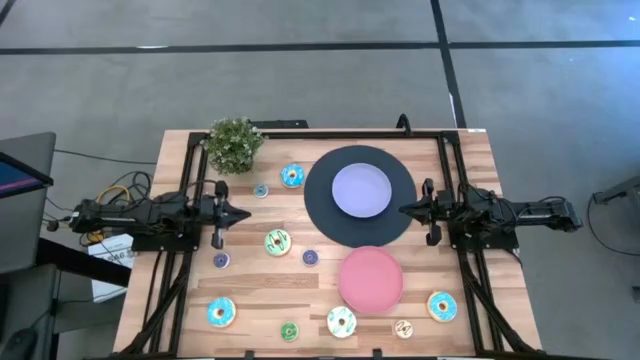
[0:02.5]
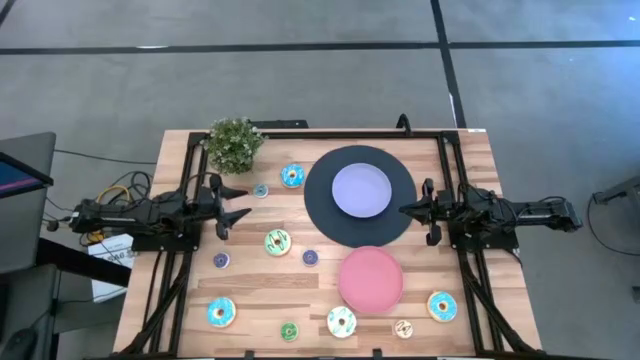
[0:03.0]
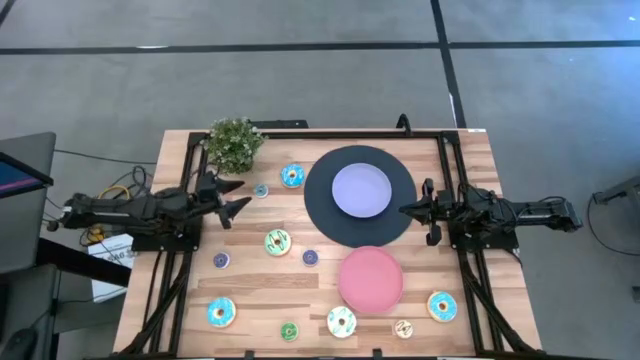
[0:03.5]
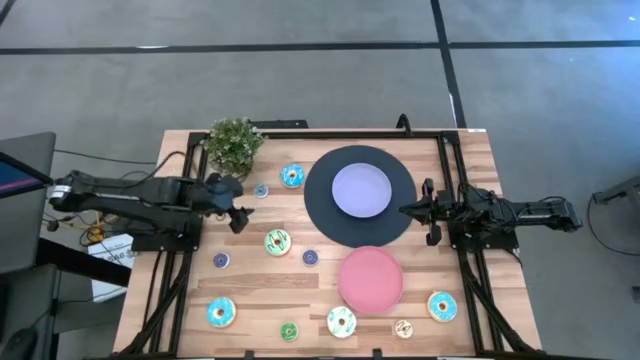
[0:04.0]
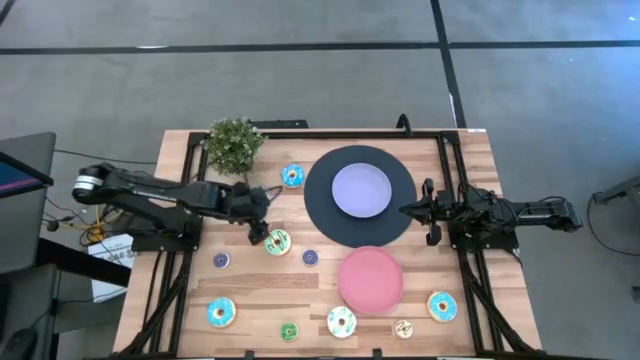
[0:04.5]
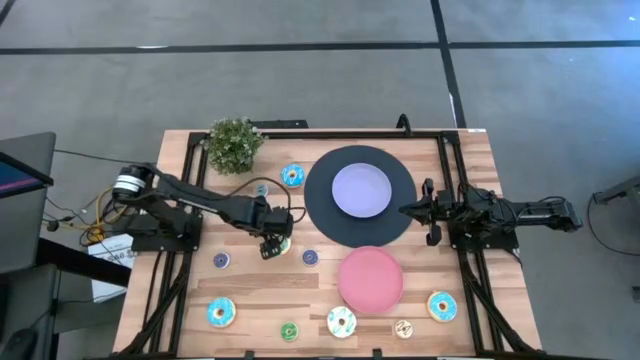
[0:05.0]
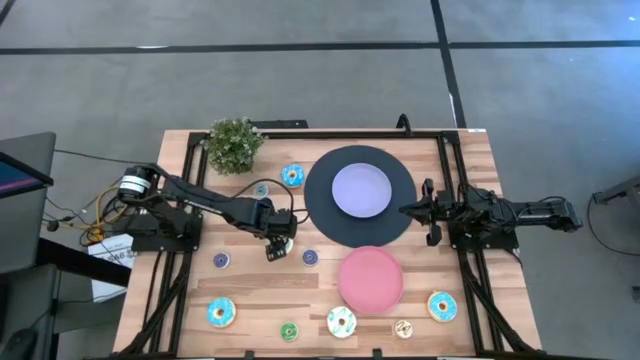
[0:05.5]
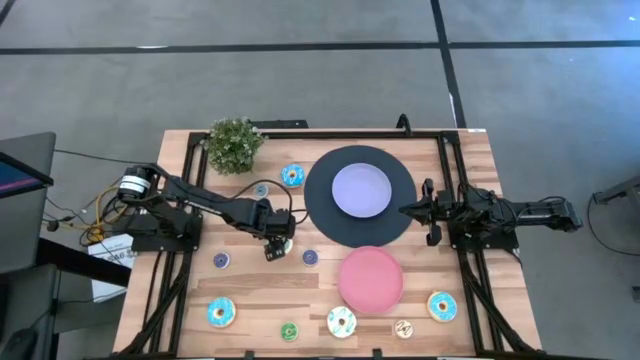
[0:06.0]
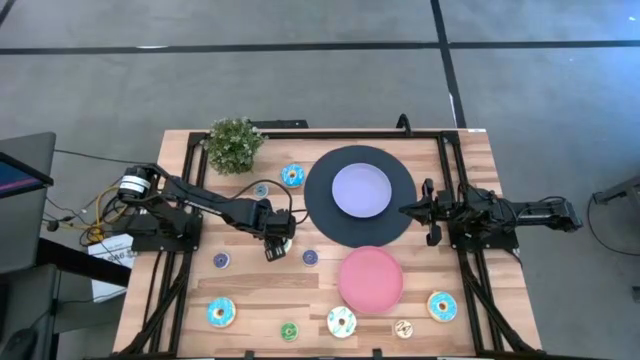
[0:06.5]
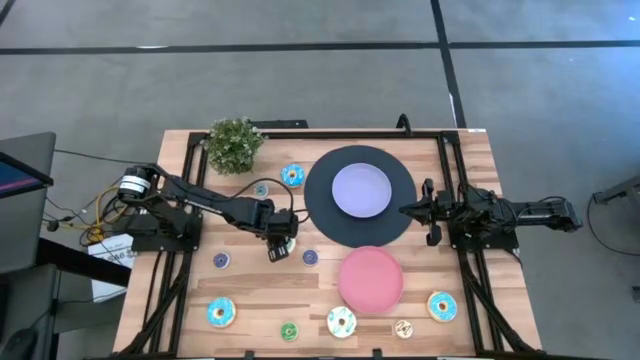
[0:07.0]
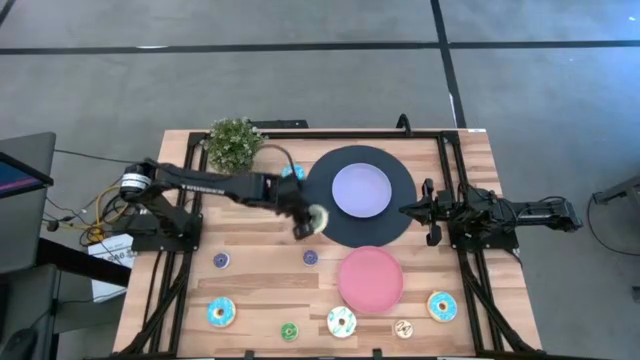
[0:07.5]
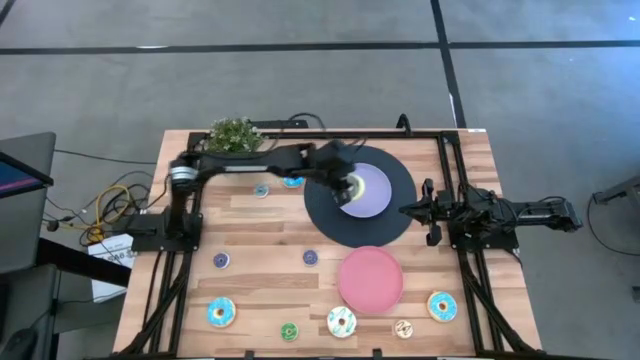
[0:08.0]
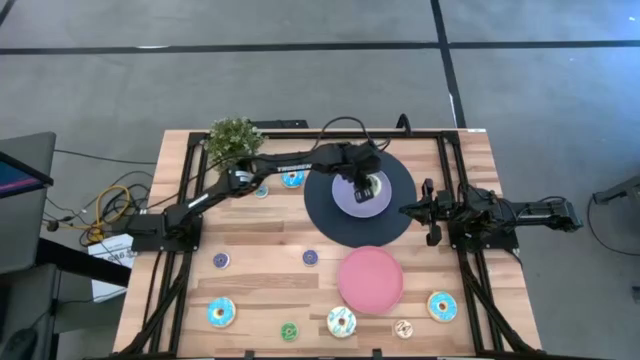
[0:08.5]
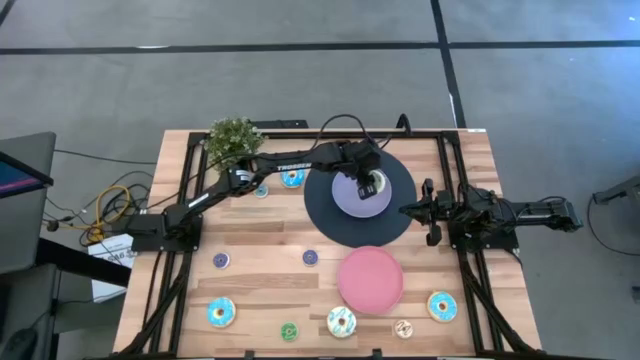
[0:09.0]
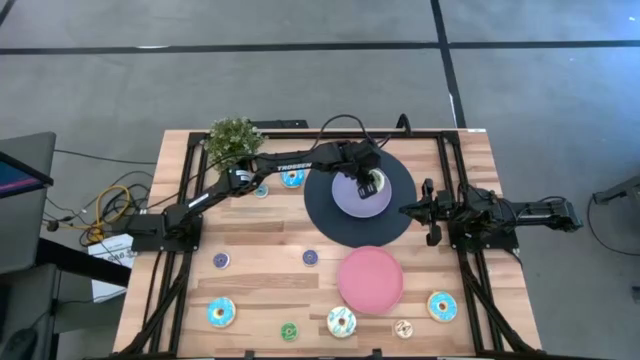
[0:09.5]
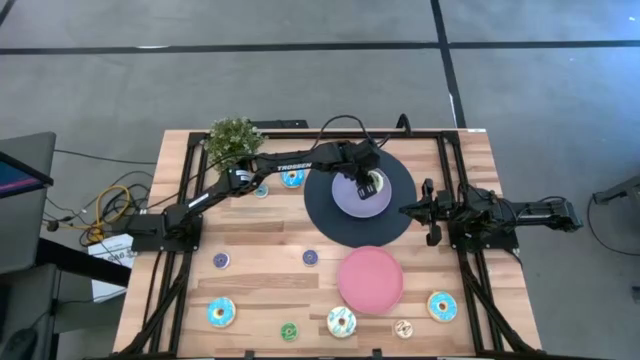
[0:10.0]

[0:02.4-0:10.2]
Task: Pick & Place donuts
Put the big light green donut into the purple plate

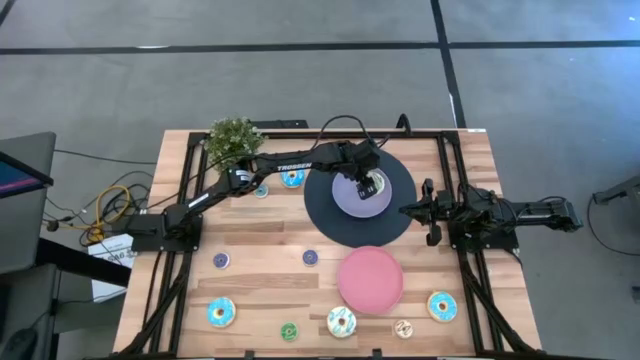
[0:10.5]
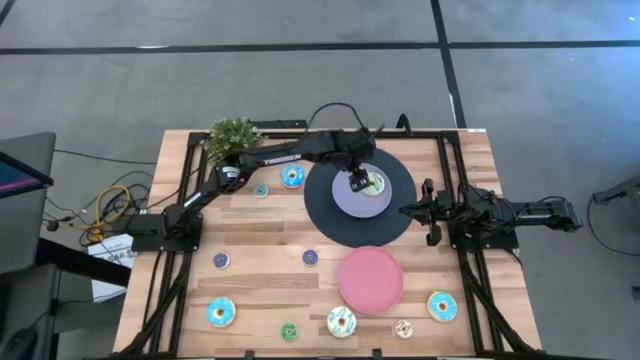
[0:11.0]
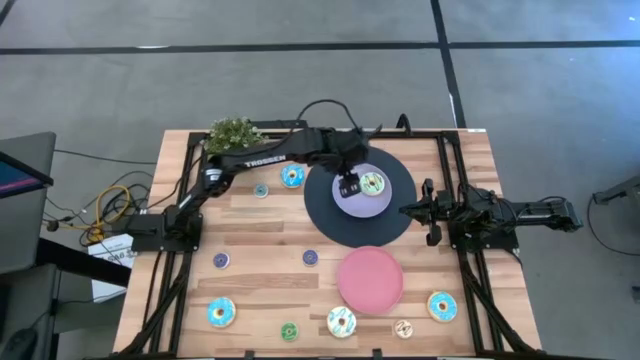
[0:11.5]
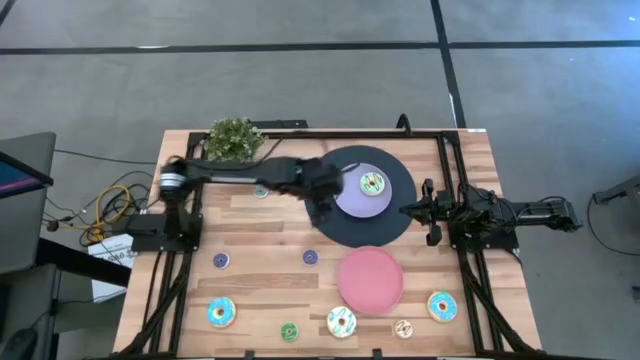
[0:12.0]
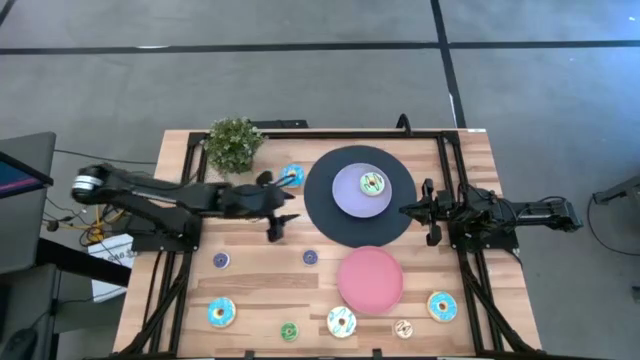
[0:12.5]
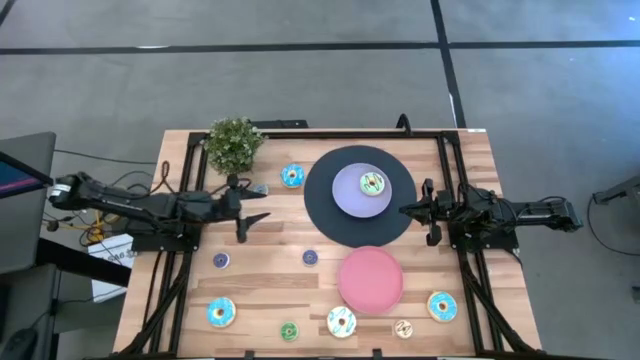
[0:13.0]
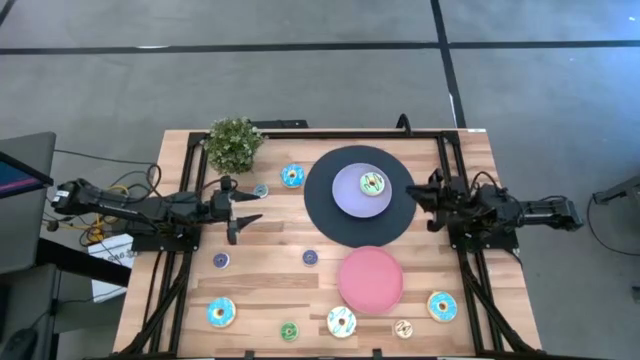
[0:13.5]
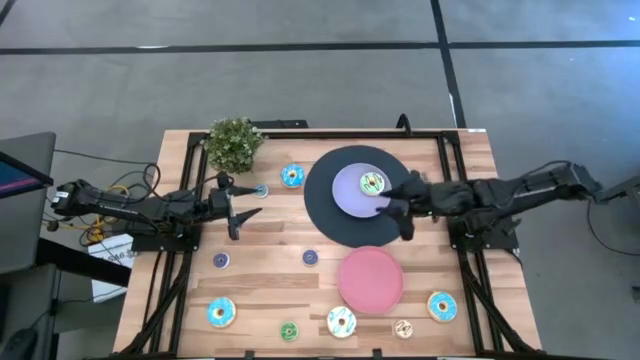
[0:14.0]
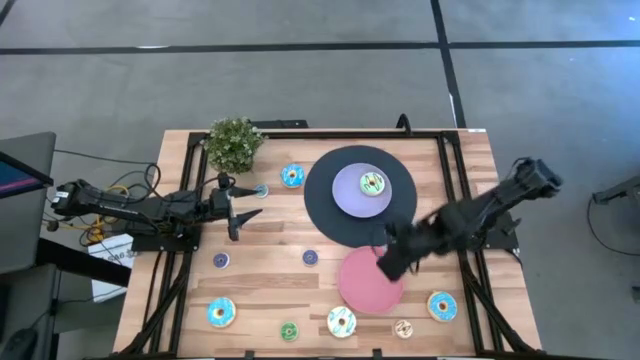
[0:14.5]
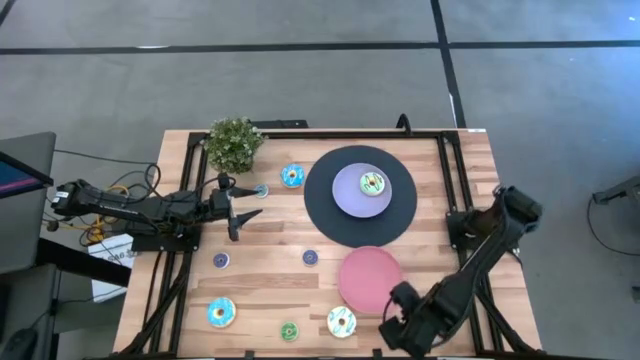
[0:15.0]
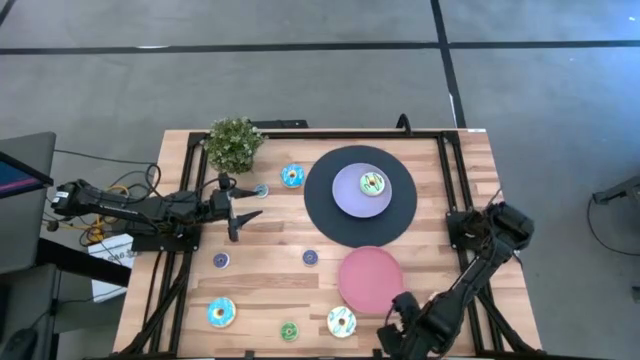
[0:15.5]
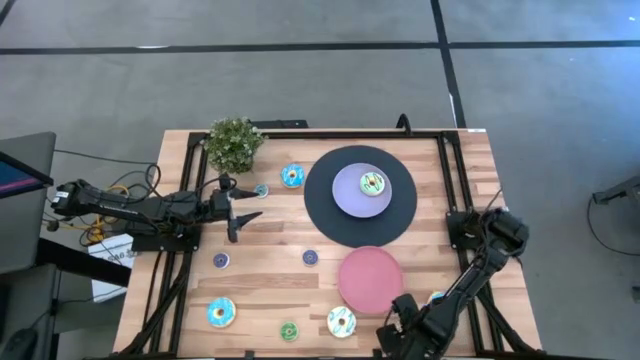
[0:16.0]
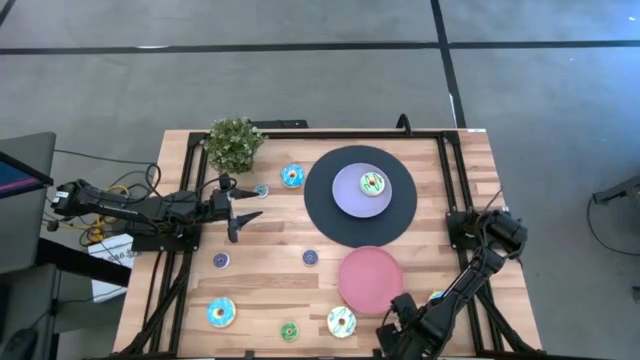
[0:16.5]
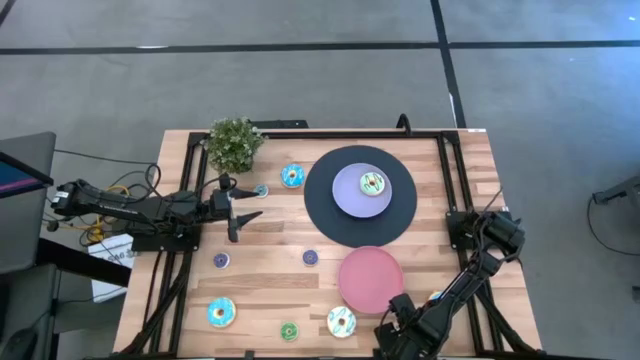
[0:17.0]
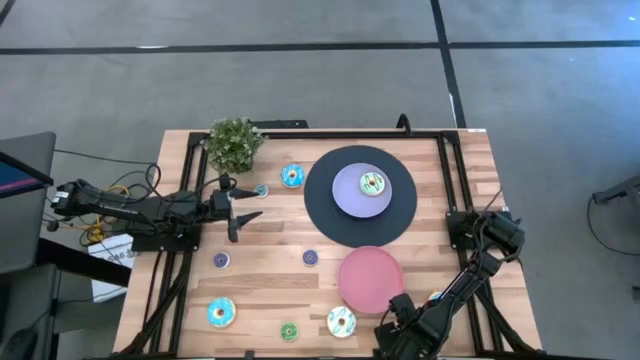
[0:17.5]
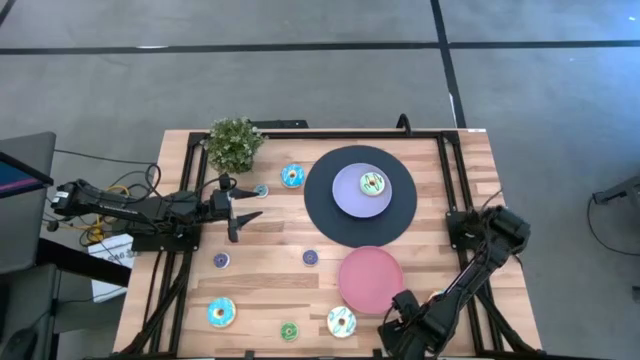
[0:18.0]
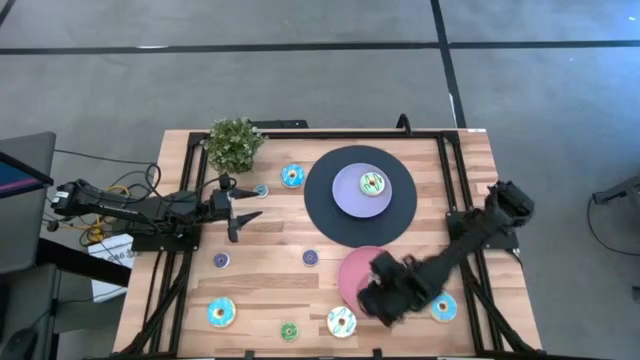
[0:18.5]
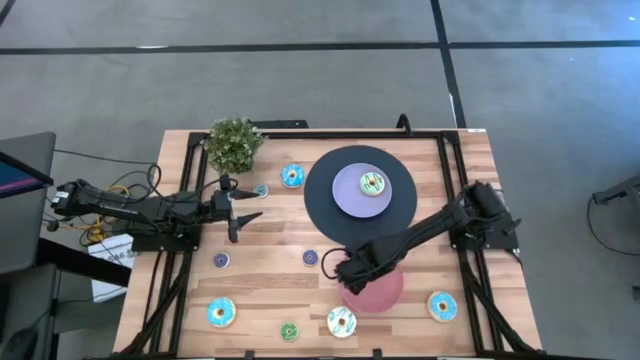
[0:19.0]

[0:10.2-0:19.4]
Put the small white donut into the pink plate

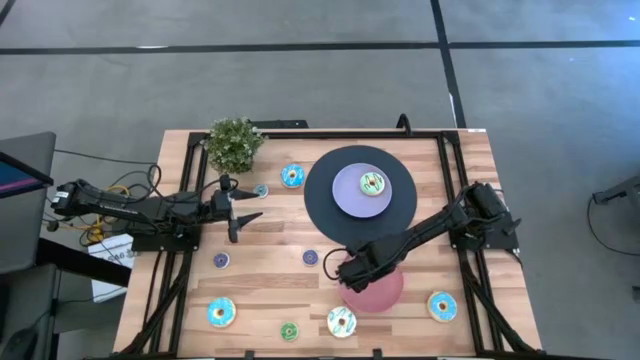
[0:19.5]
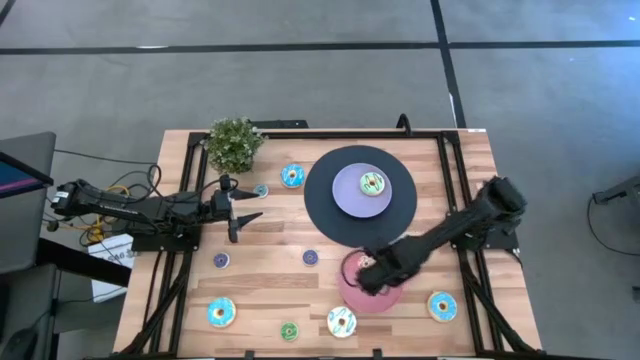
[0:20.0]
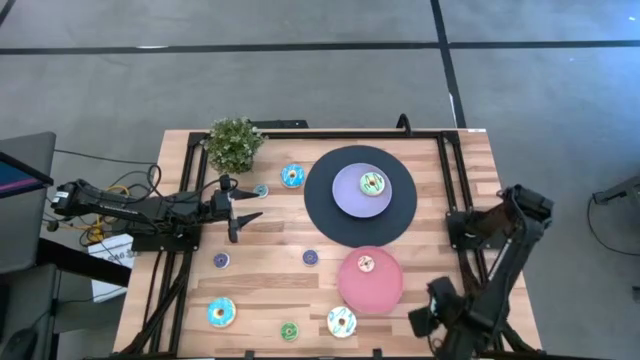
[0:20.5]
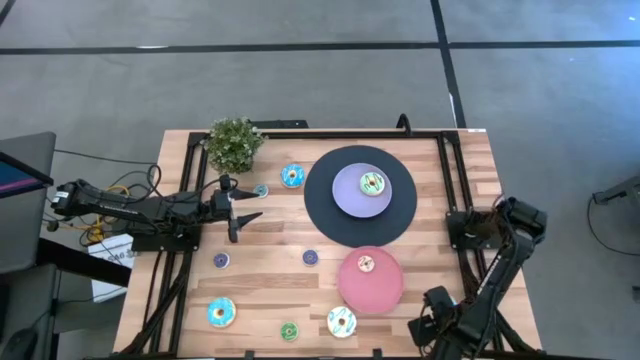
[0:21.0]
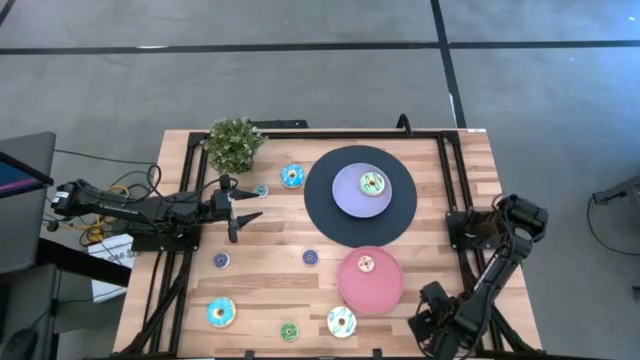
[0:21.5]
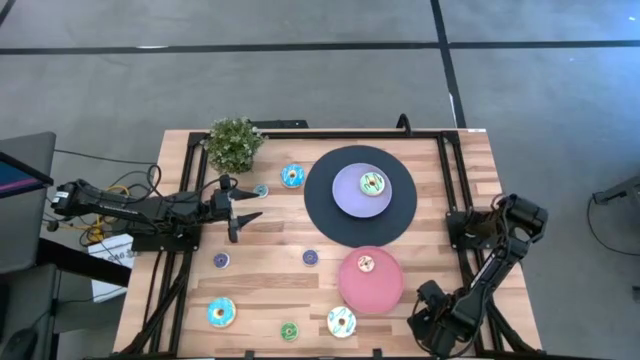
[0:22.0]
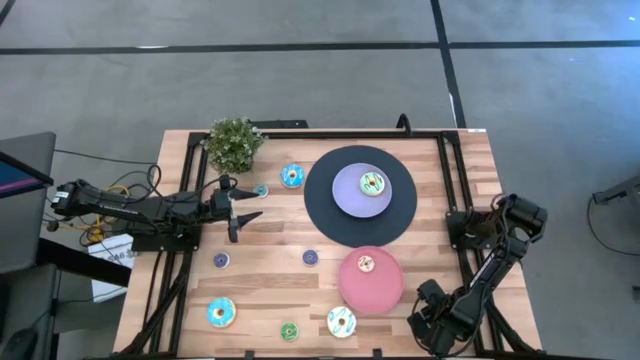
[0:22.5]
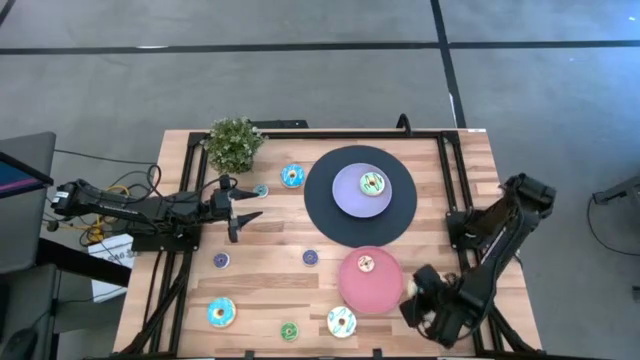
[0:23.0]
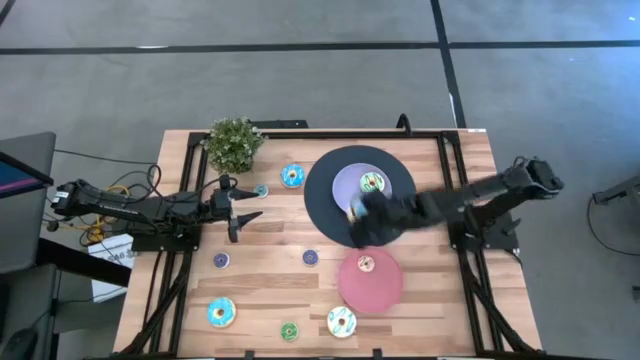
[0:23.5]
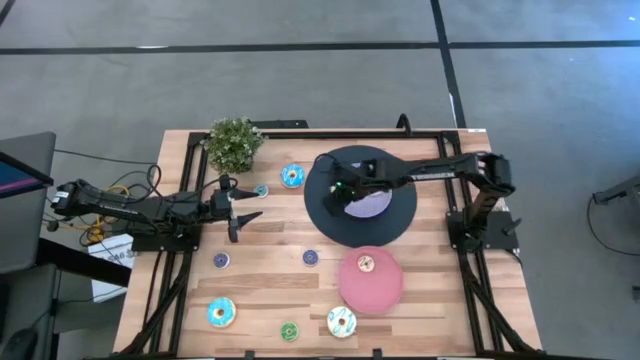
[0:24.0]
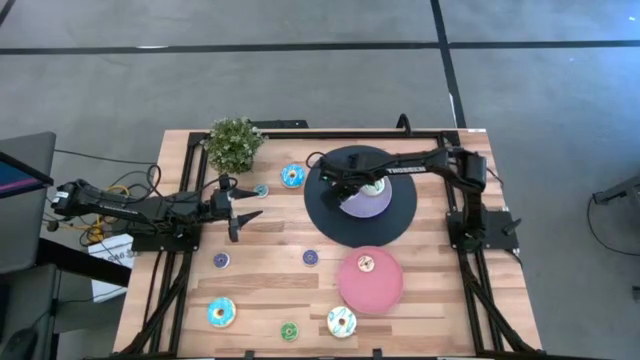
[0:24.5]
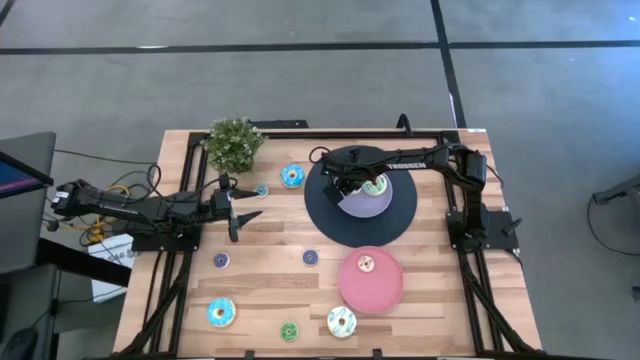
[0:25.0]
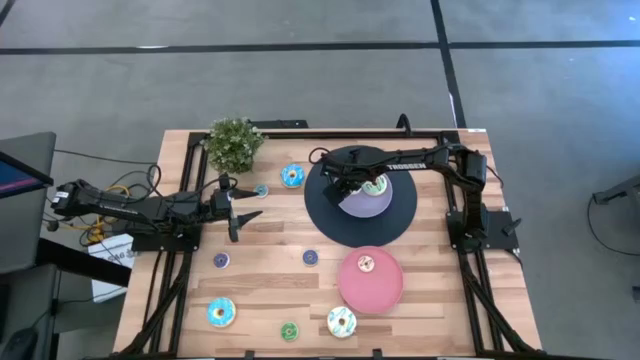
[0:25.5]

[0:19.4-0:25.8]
Put the bottom right big blue donut into the purple plate
